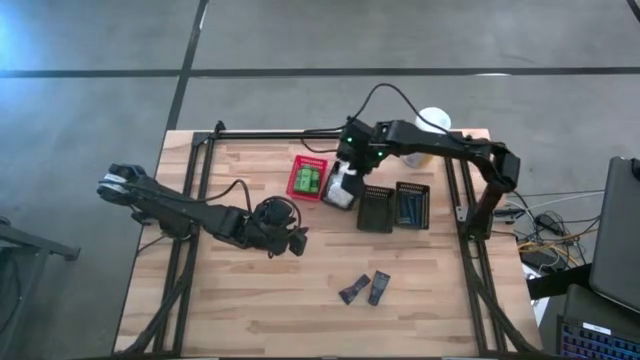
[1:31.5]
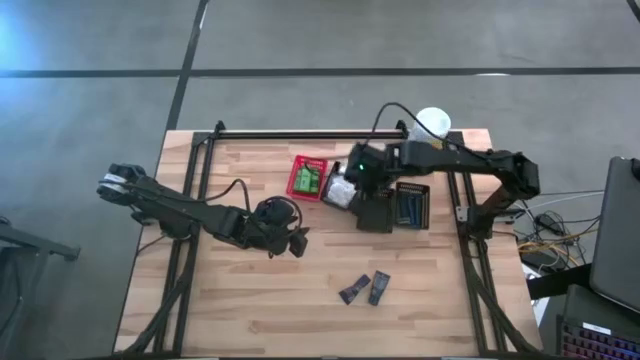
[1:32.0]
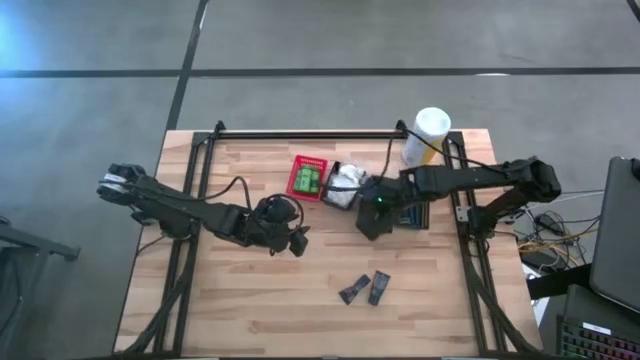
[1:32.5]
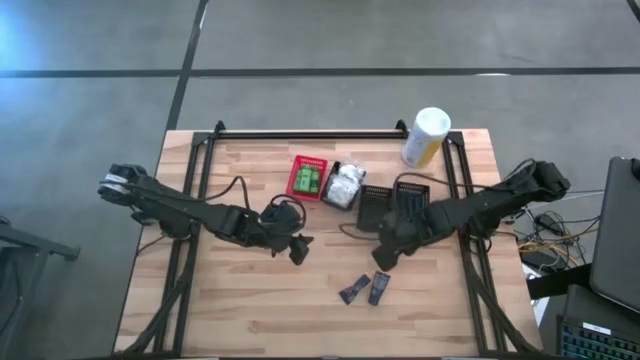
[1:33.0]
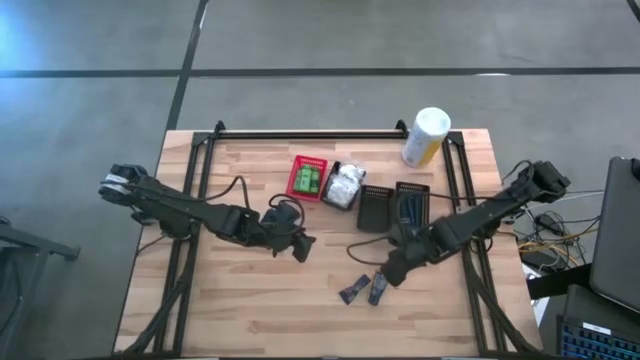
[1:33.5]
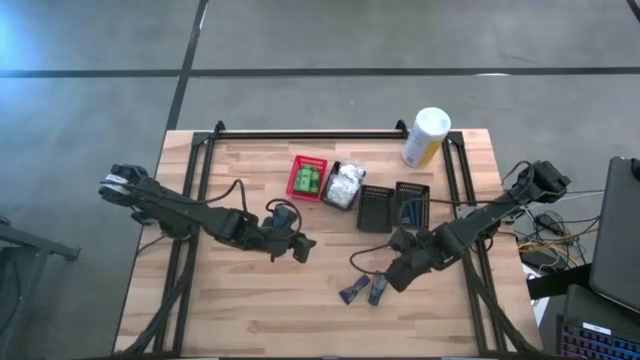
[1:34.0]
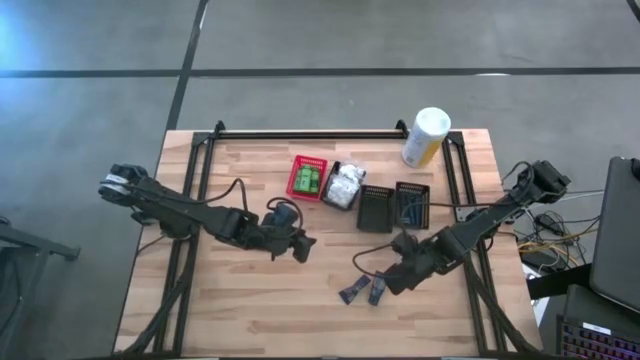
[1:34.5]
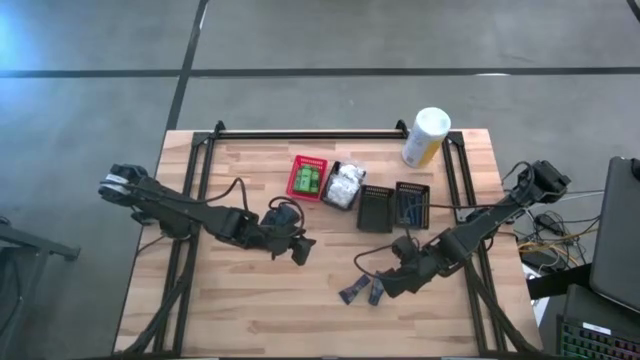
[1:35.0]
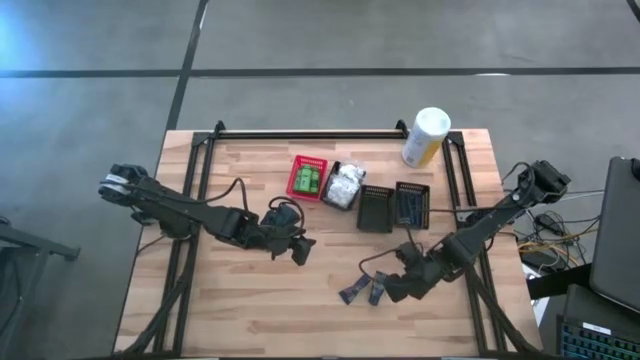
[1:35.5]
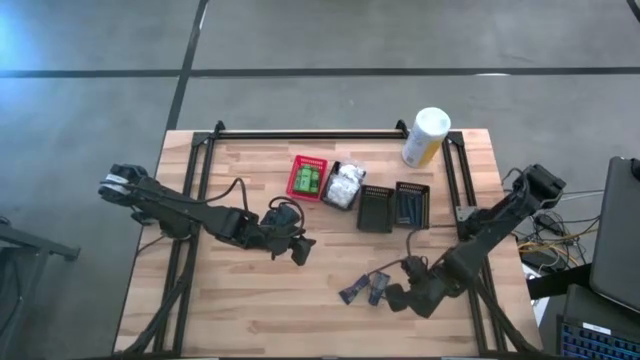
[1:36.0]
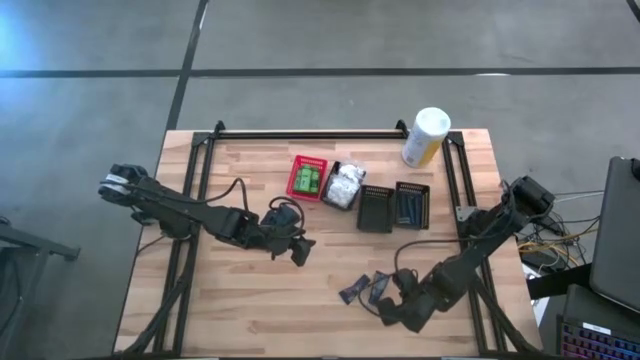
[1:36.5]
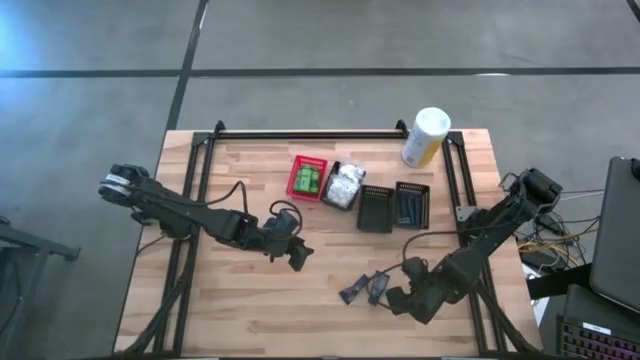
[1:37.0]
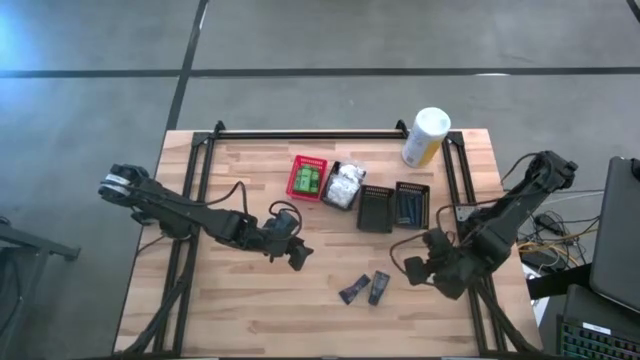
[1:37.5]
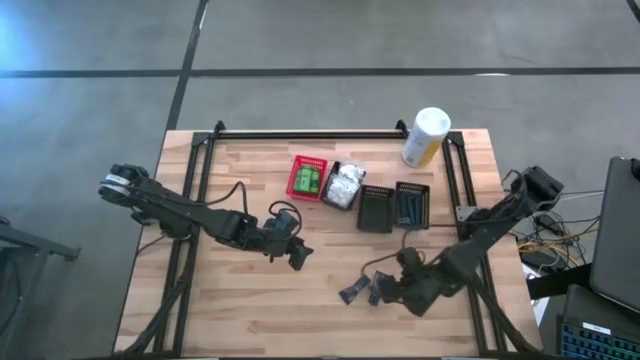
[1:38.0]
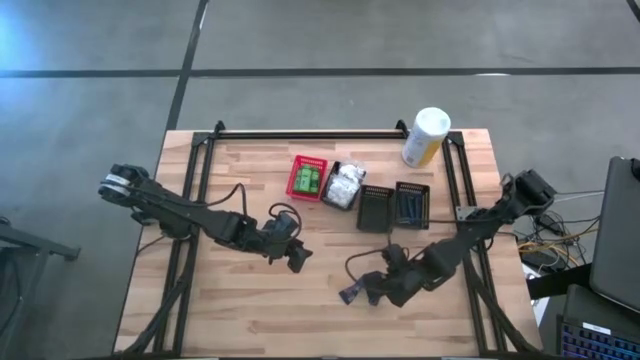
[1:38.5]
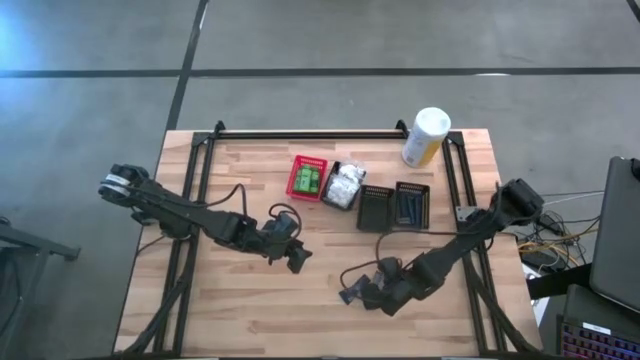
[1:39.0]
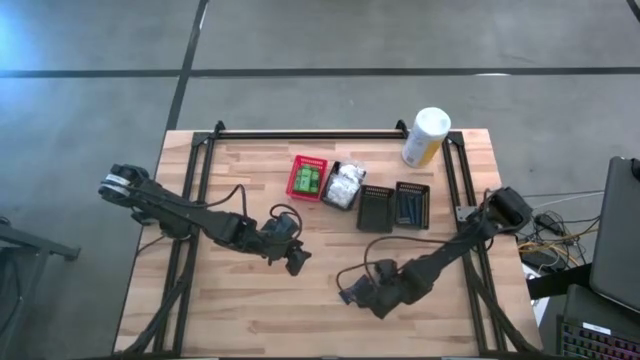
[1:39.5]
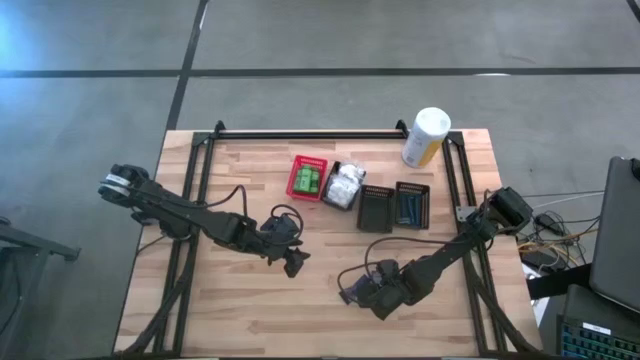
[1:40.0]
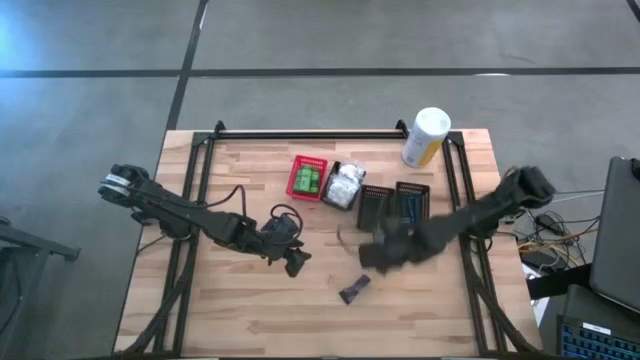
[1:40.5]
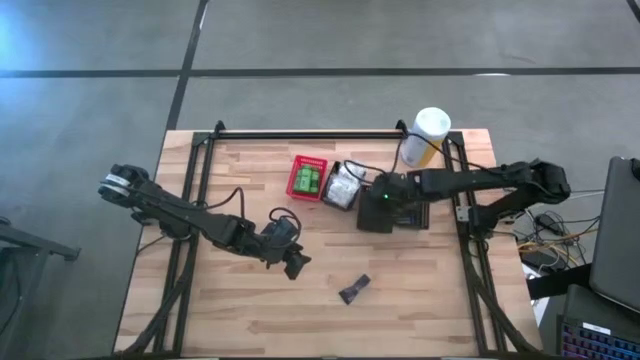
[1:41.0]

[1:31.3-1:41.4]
Task: Pick & Place Travel size toiletries
Put the shave cream into the middle black bin

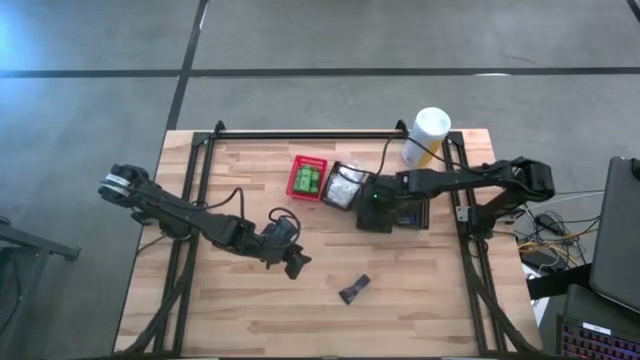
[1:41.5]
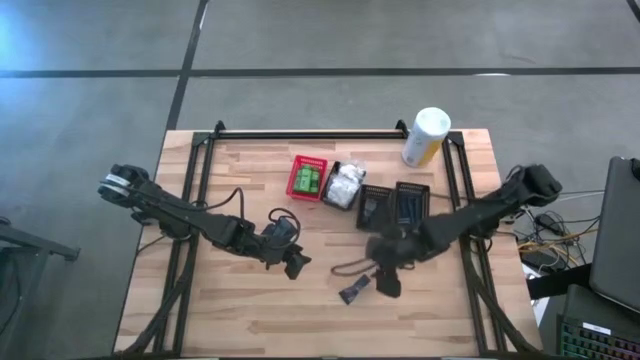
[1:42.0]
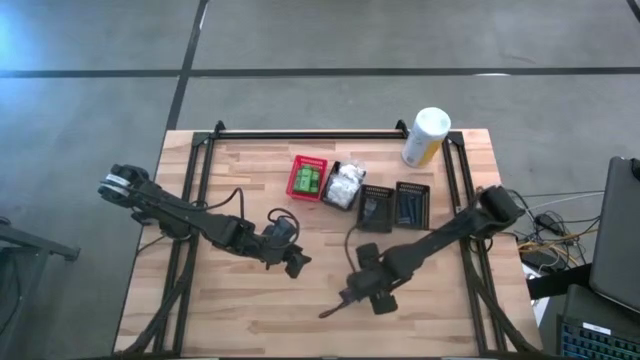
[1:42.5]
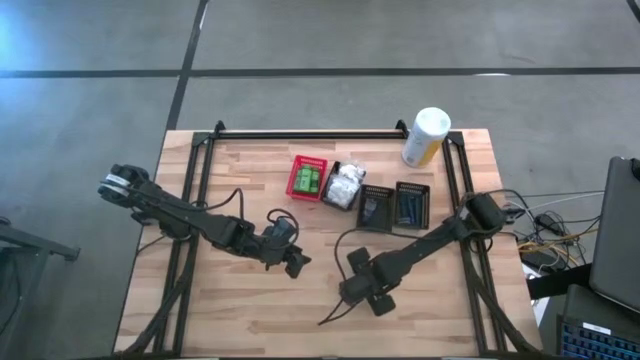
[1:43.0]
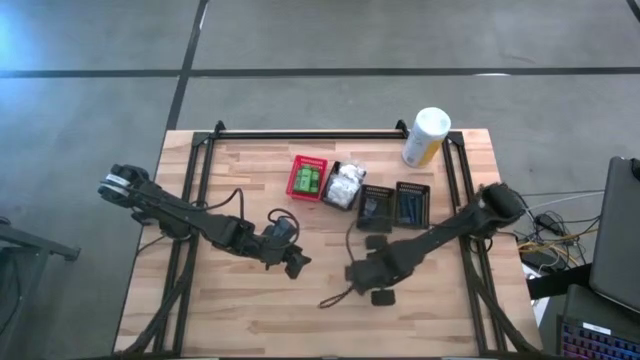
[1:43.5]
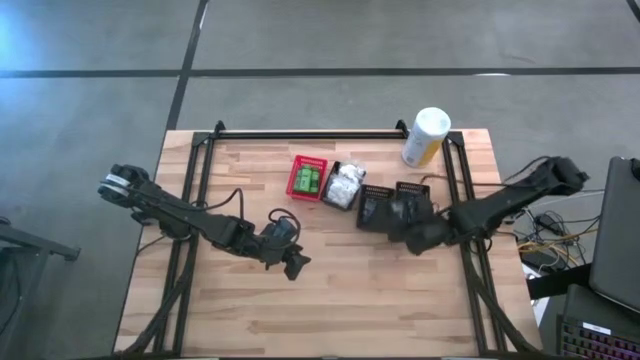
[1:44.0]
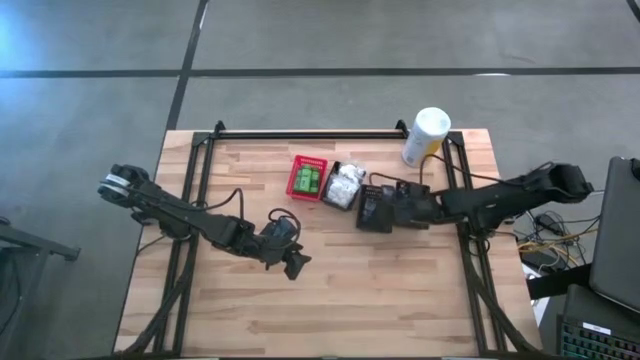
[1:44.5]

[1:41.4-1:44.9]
Put the shave cream into the middle black bin

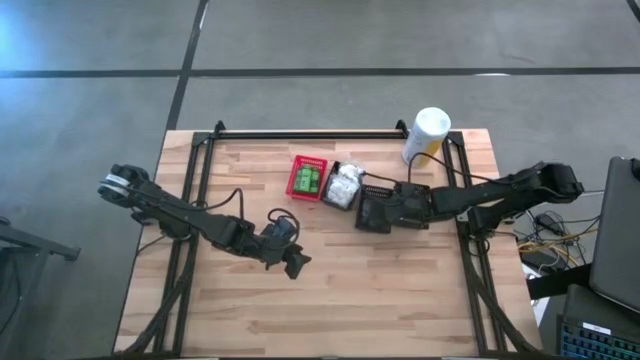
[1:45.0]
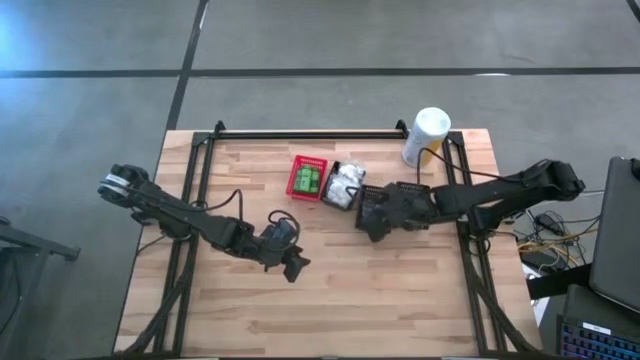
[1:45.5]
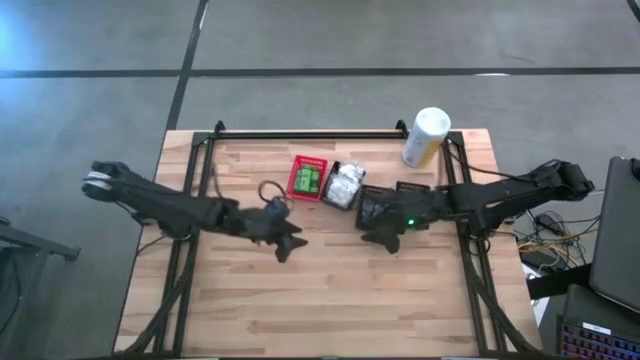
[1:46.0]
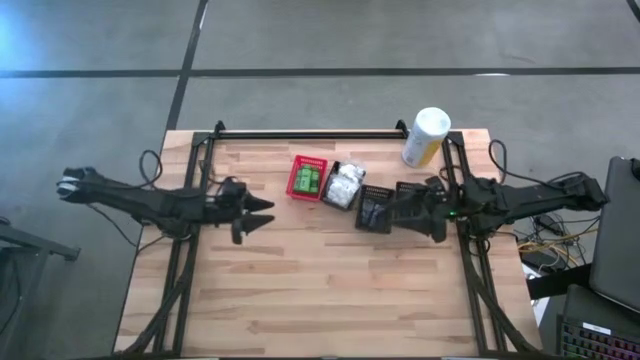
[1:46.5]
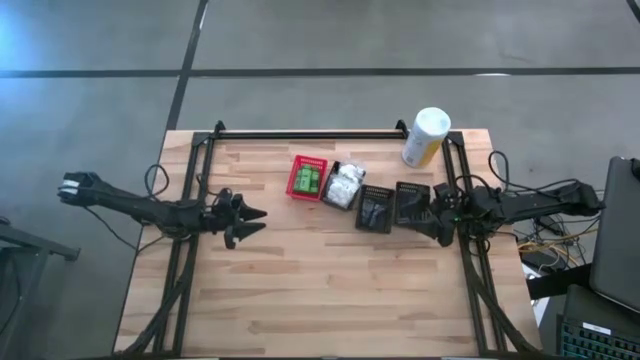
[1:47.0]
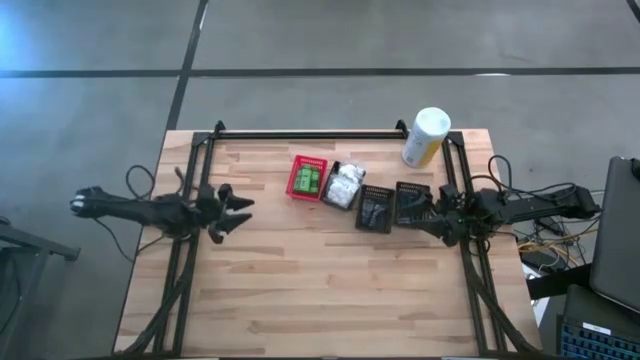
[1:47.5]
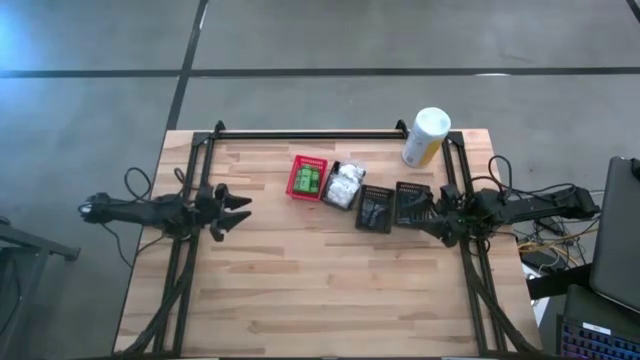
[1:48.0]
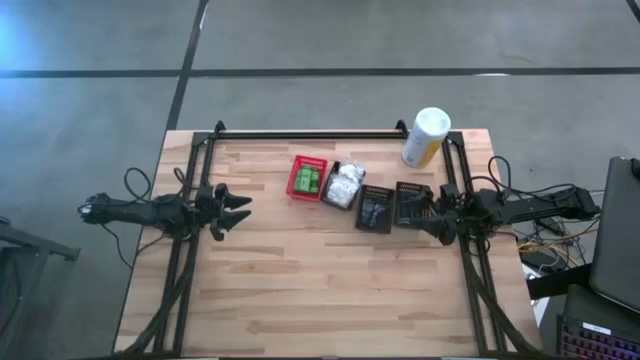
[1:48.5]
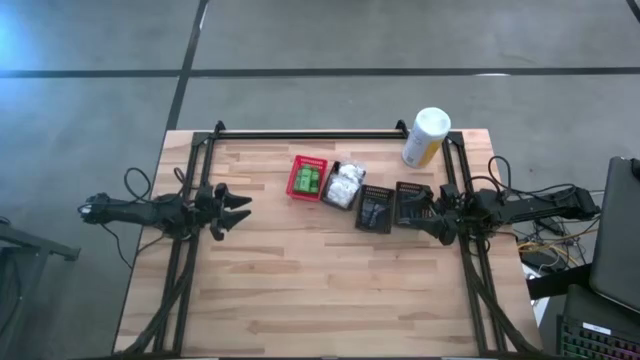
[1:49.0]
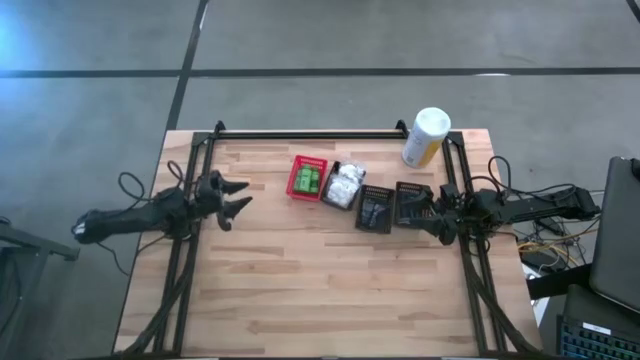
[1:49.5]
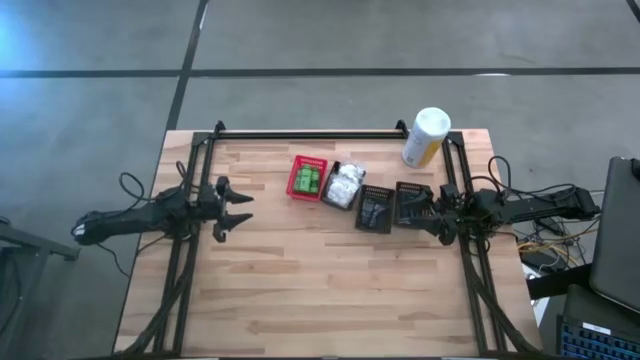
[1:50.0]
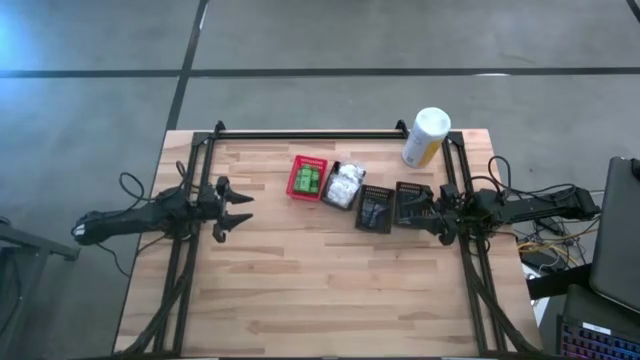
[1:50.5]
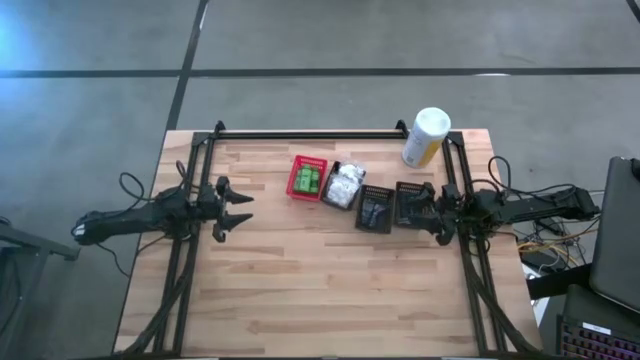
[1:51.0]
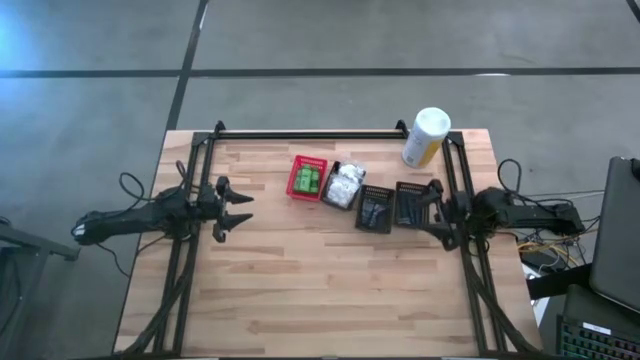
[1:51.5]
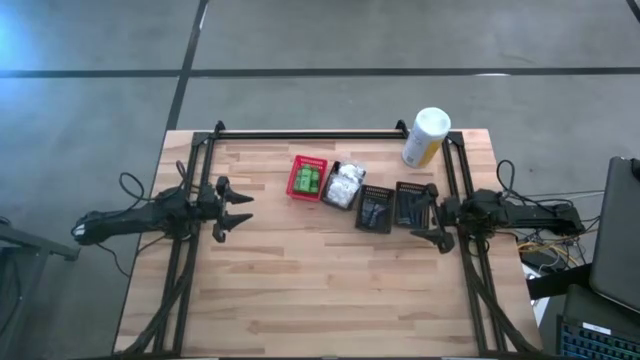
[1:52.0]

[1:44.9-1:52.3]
Return to Home Position

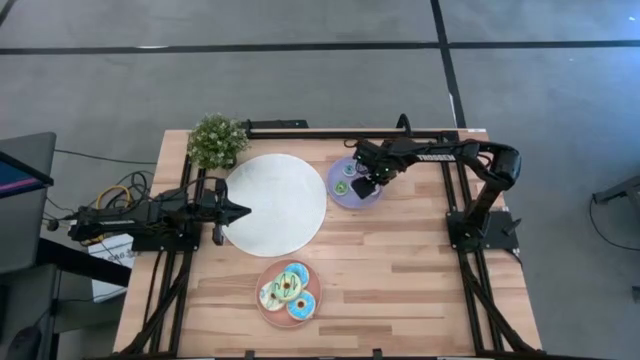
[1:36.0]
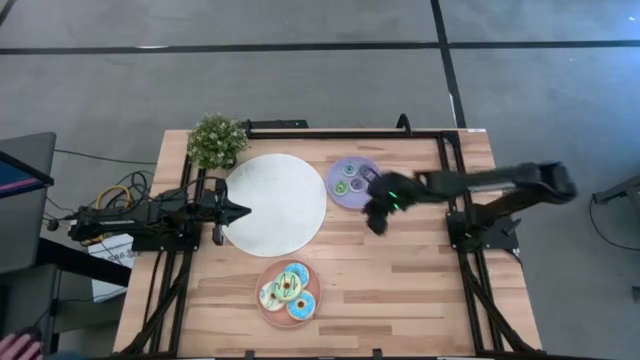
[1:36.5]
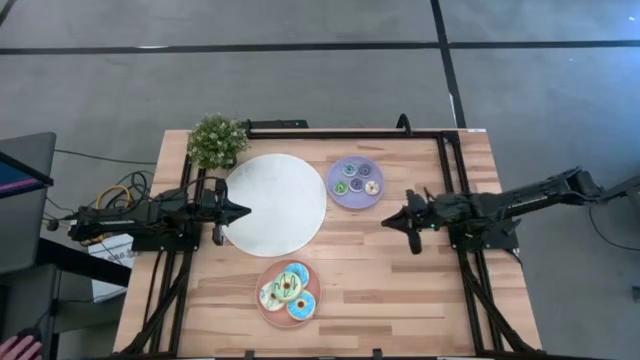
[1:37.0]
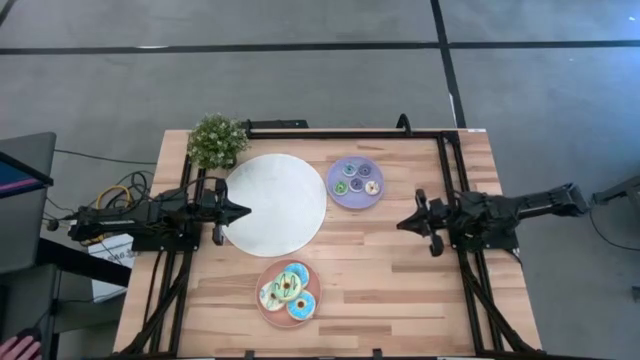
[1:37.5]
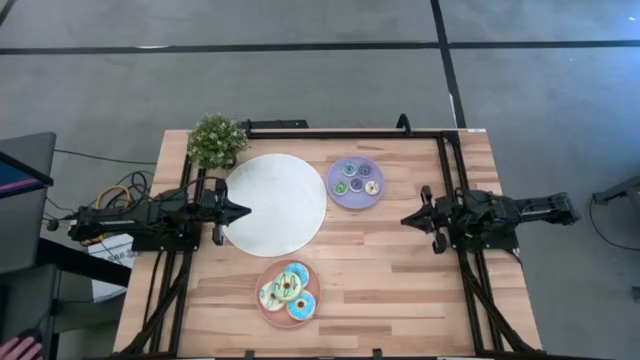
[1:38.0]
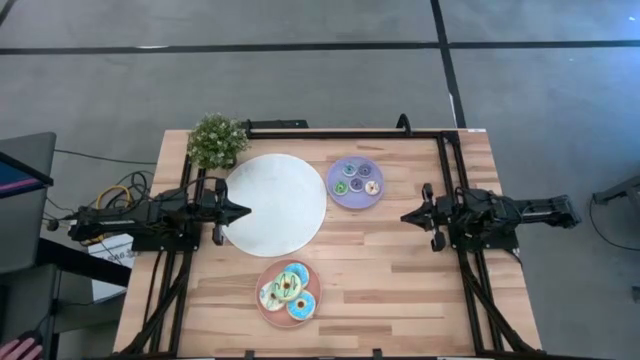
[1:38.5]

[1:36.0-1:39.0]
Task: Pick & Place donuts
Return to Home Position
